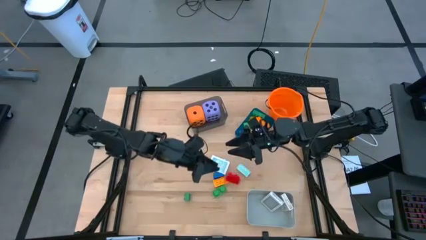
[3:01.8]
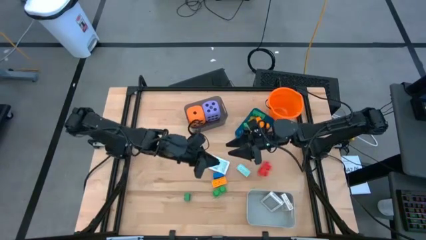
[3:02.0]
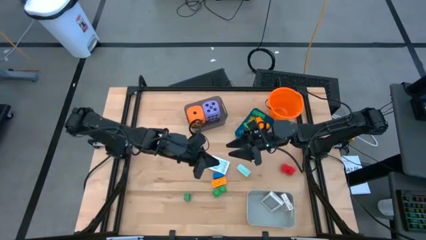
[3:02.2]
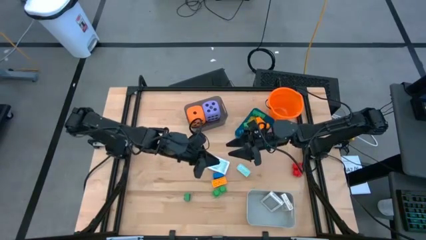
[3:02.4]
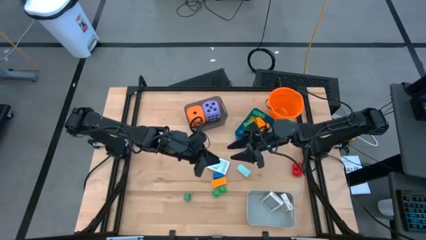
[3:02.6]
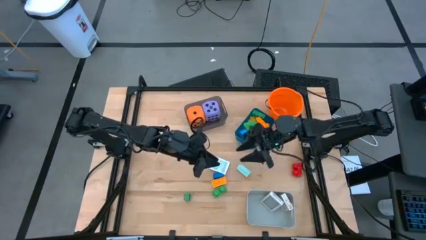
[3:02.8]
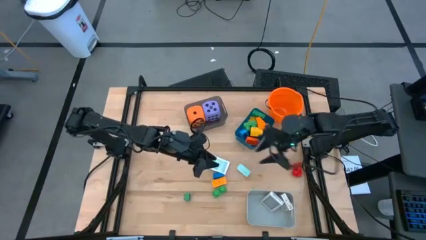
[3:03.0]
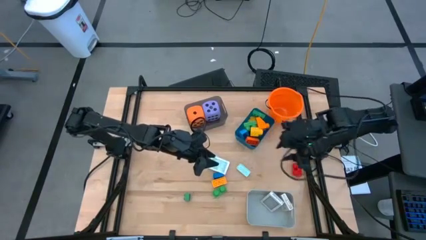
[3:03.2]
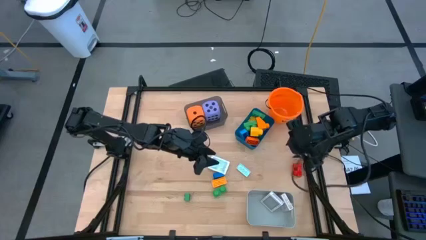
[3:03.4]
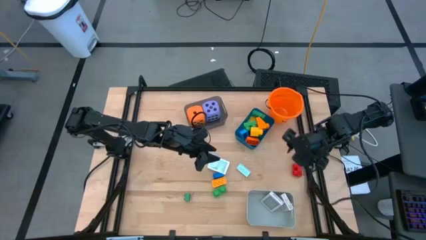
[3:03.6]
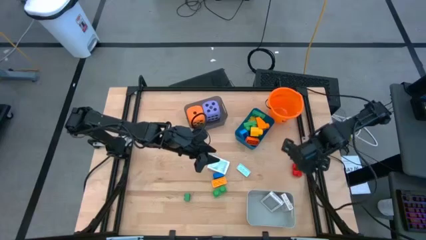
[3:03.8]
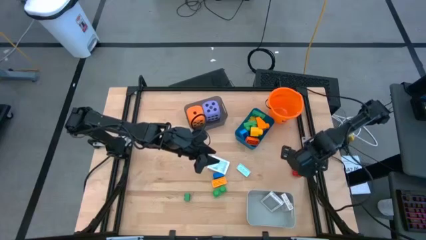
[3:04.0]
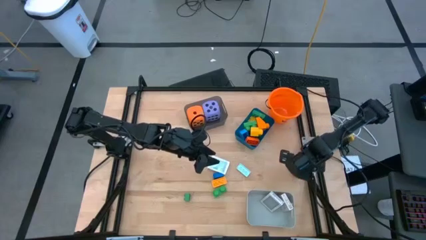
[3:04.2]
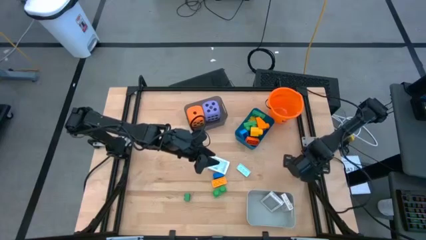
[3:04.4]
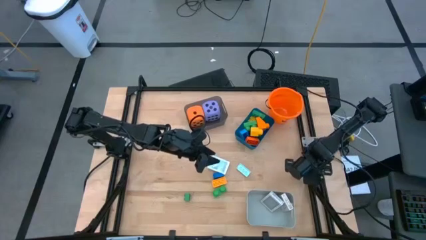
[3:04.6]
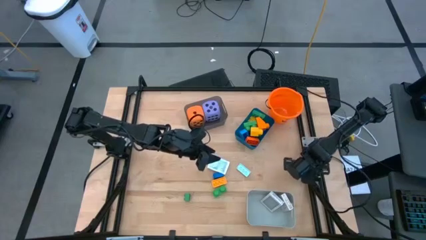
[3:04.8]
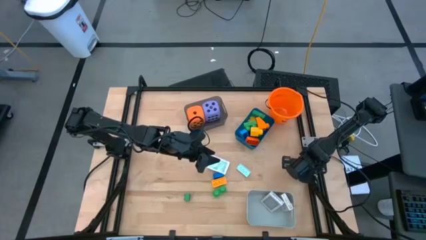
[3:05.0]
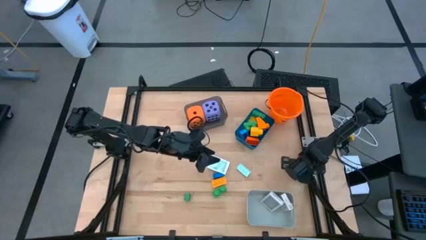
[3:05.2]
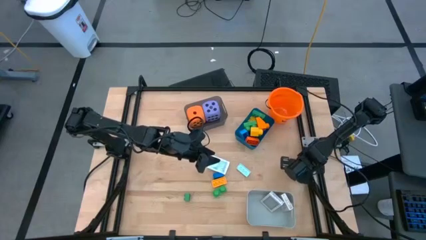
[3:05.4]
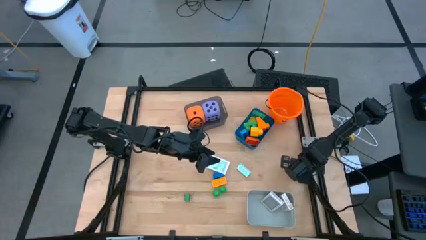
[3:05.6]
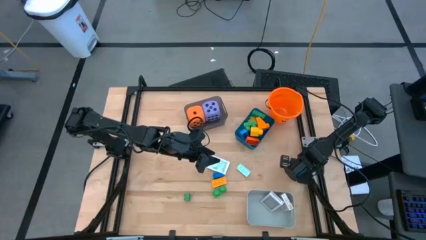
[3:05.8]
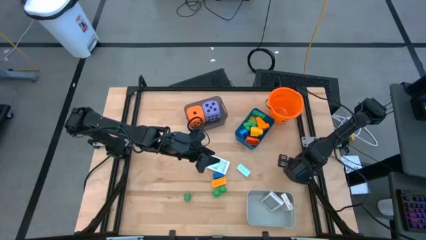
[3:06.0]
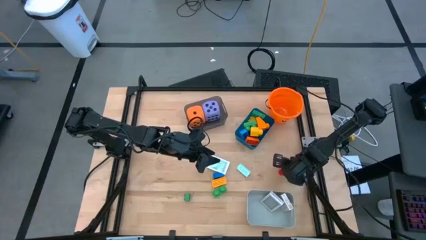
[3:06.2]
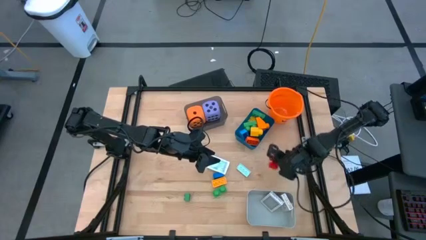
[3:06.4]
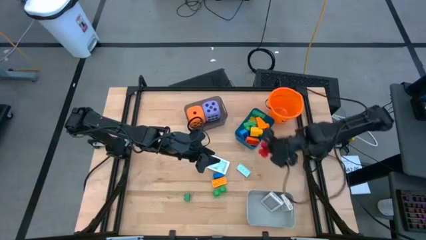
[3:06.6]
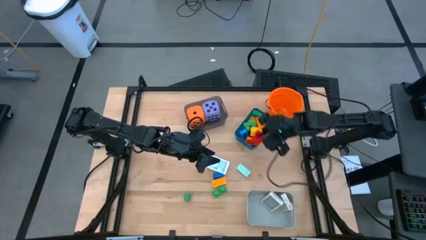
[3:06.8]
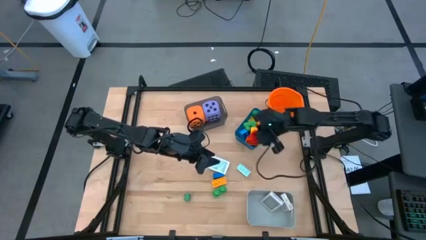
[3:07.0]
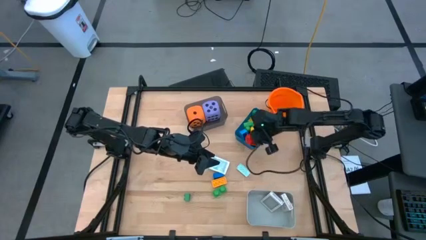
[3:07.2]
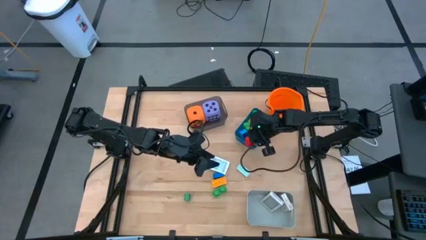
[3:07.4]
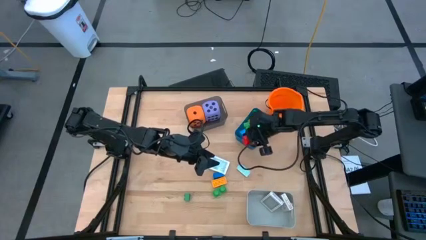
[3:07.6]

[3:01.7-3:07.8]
Task: Pick & Place Toys
Put the red game piece into the blue bin

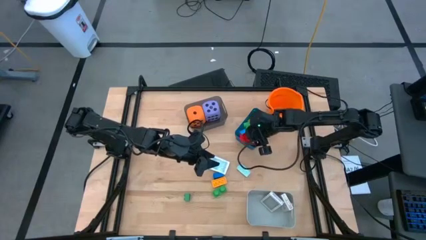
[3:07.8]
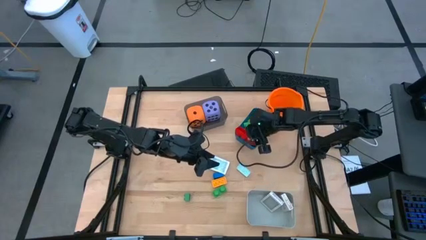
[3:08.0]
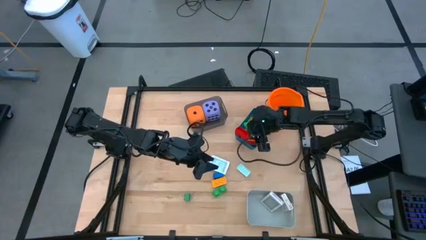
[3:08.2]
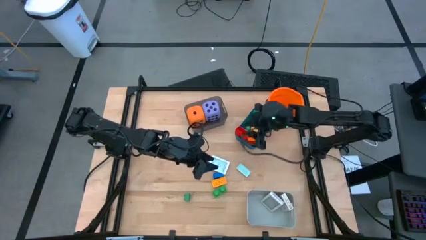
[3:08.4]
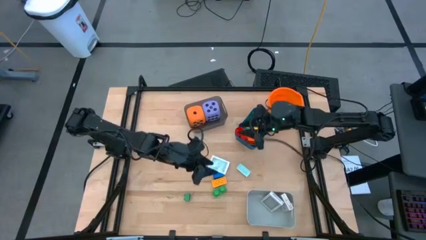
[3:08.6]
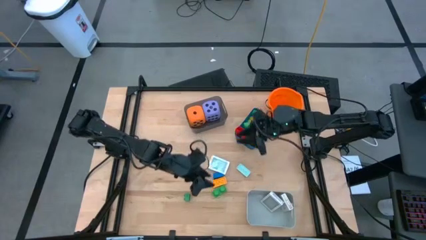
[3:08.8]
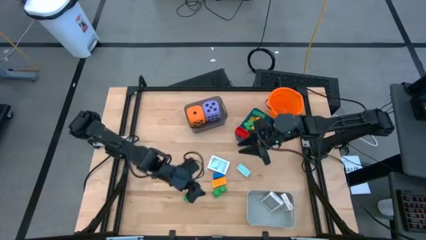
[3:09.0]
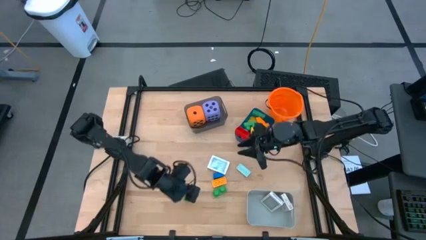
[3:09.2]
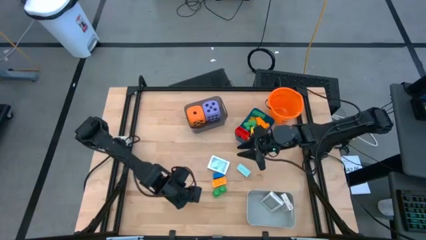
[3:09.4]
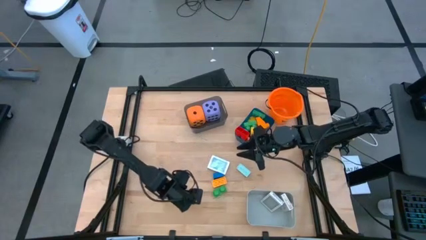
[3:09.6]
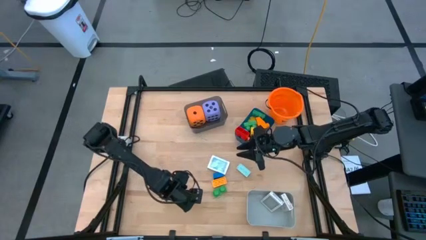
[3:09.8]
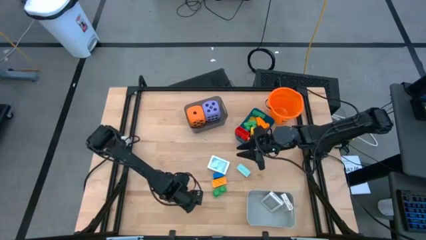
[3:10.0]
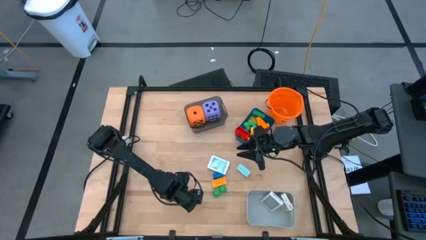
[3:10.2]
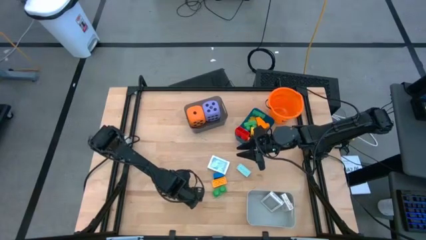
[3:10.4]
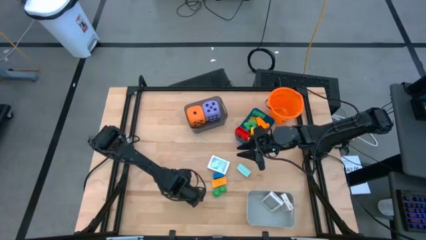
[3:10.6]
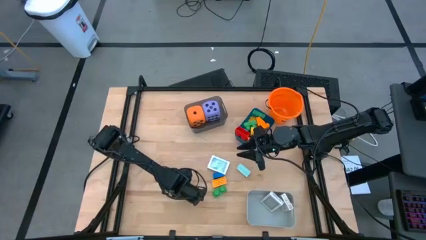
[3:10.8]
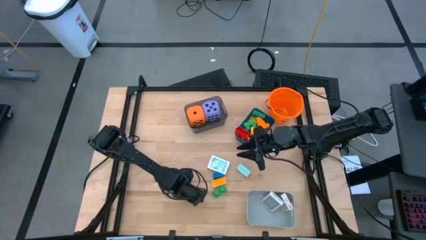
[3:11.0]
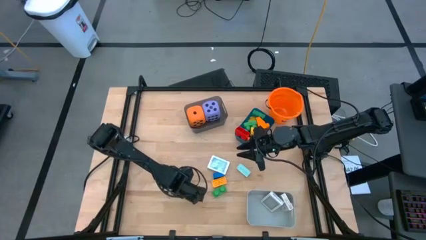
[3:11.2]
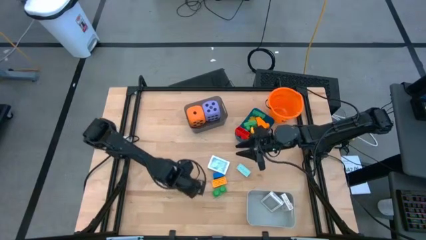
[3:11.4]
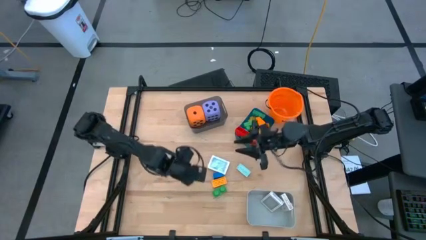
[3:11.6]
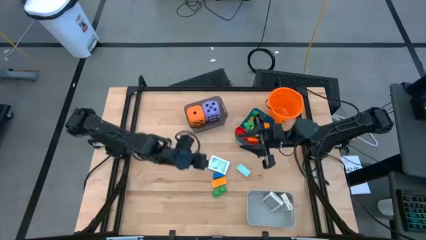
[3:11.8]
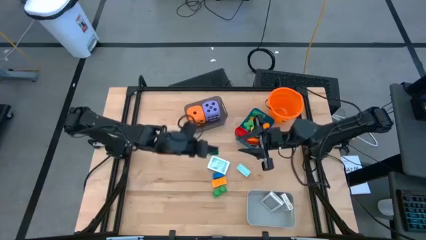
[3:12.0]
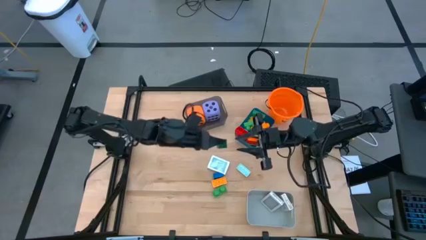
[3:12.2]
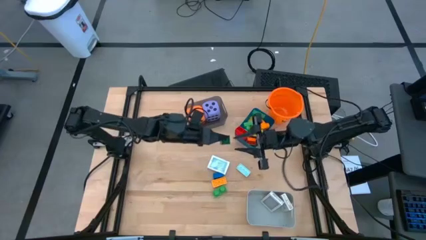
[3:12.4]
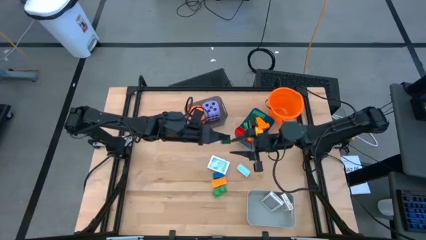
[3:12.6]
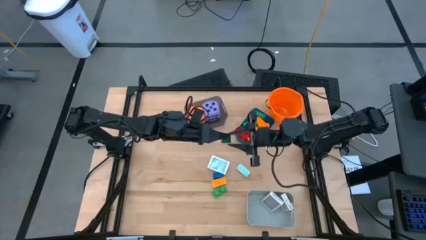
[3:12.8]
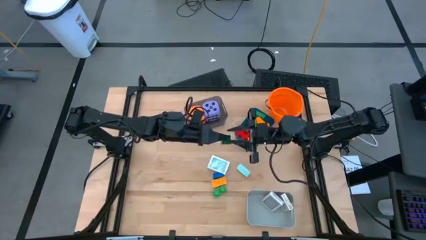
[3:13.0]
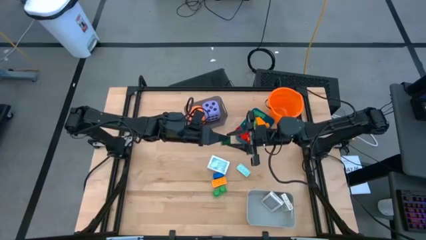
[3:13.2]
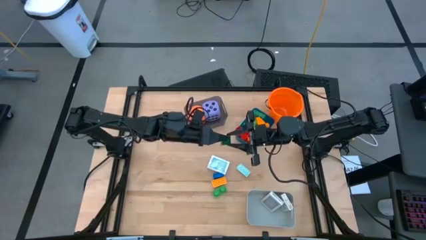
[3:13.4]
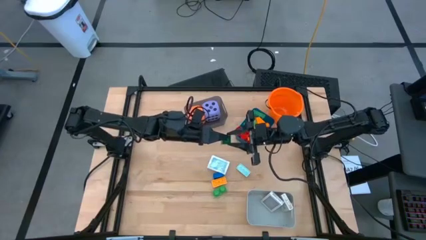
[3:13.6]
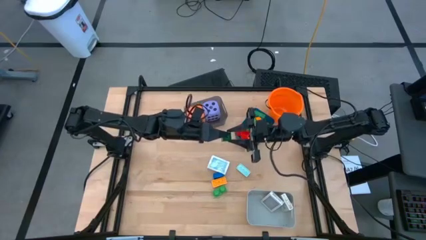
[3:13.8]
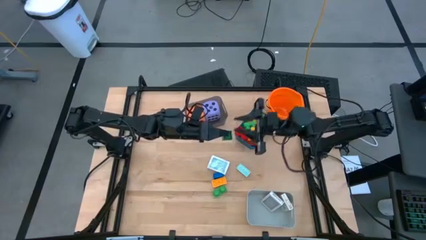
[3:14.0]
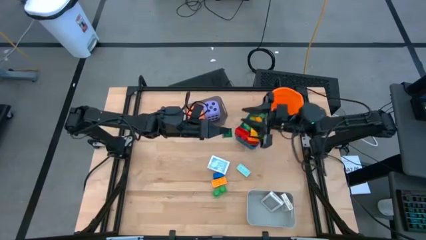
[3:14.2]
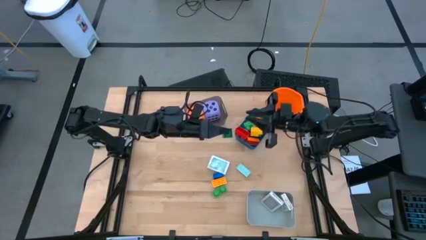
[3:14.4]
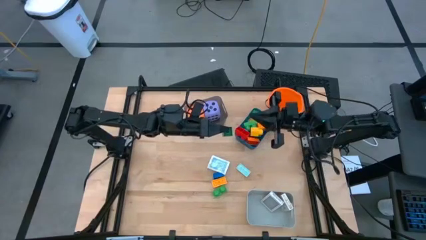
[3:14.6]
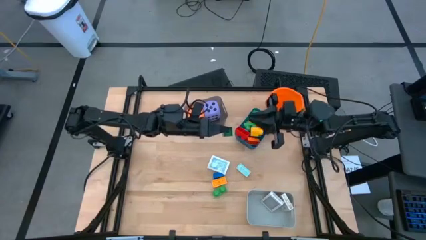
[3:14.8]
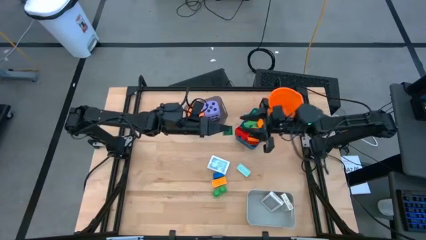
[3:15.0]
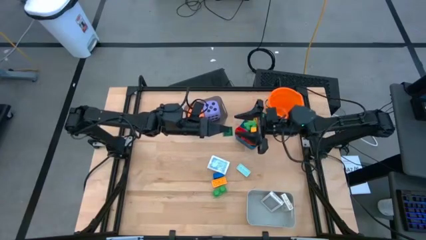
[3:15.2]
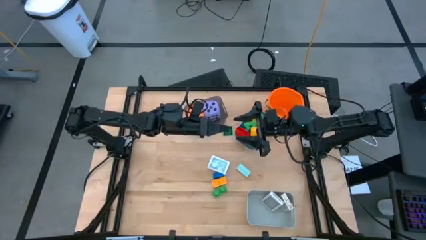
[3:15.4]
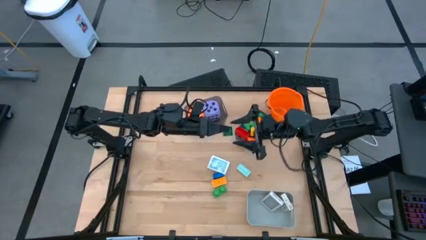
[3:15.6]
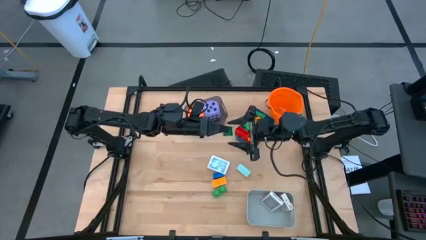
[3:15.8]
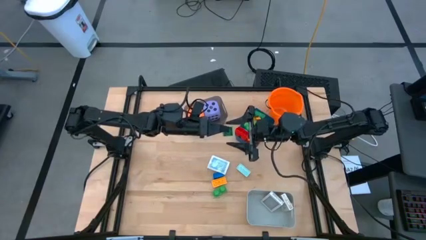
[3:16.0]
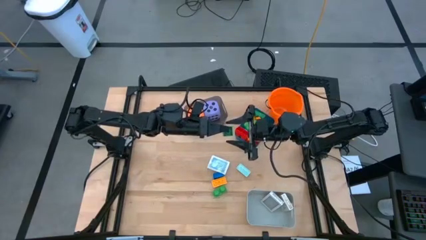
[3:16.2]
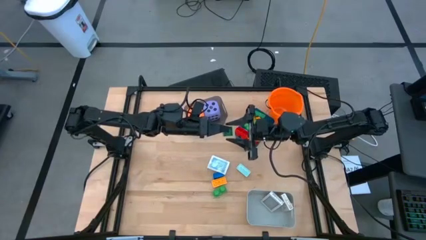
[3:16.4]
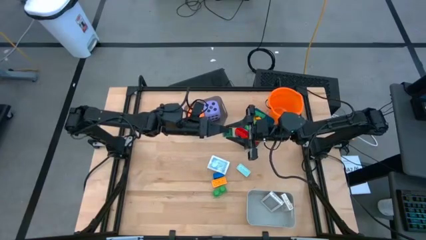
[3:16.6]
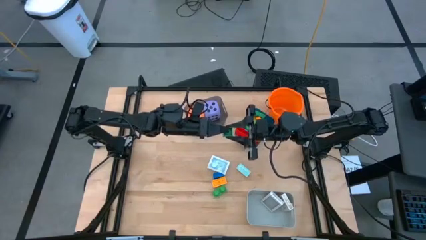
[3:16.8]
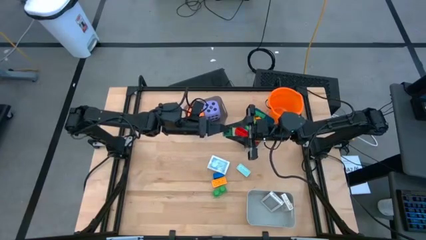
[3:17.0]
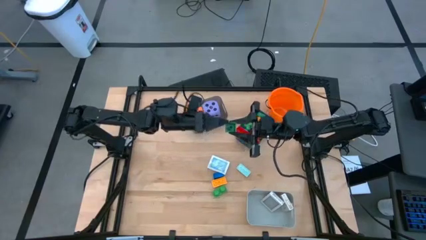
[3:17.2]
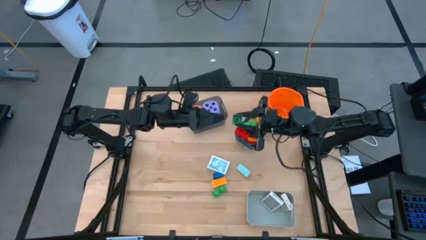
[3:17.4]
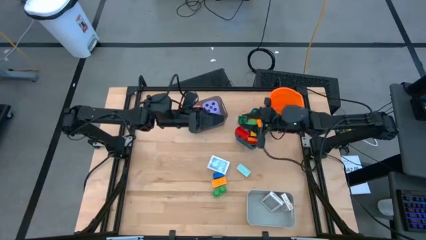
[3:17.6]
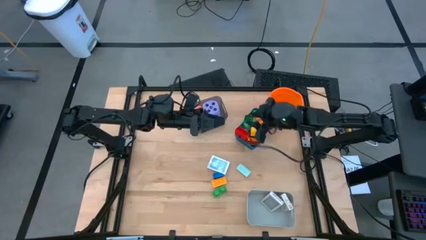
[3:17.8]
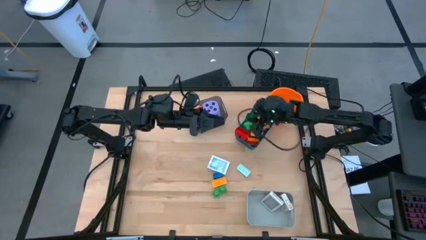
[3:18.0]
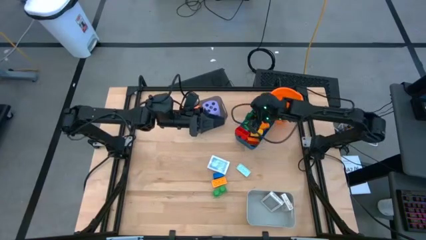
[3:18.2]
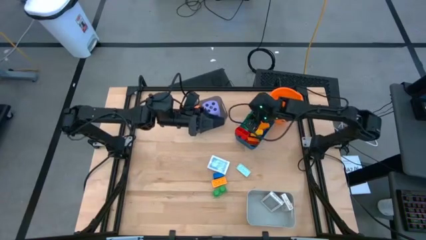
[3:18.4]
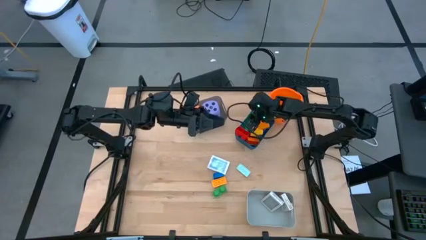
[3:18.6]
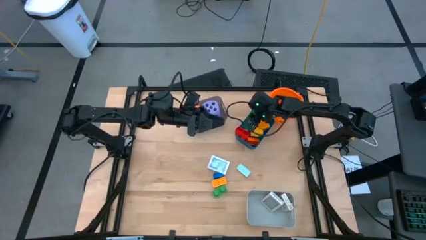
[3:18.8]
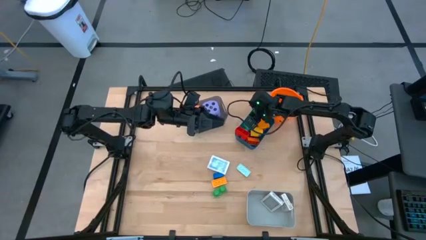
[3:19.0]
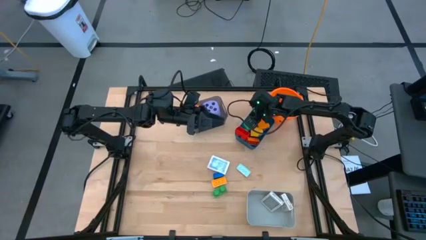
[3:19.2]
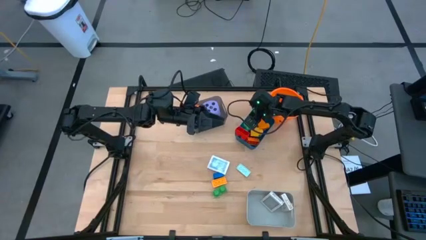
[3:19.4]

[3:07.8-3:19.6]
Put the left green game piece into the blue bin
